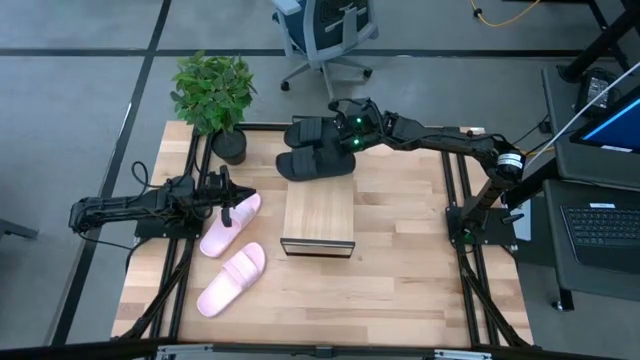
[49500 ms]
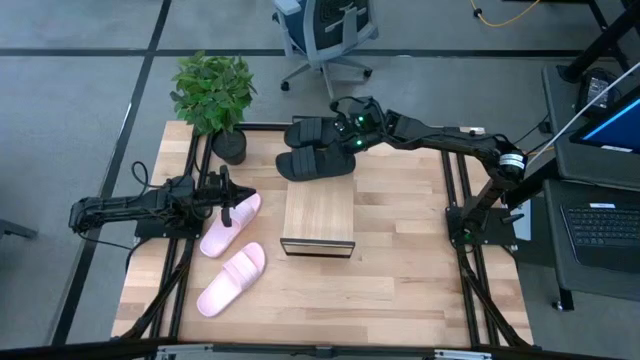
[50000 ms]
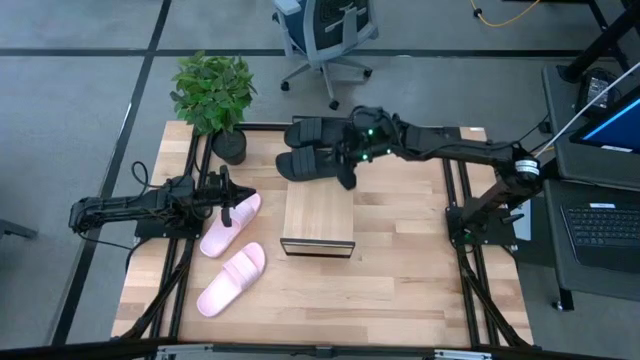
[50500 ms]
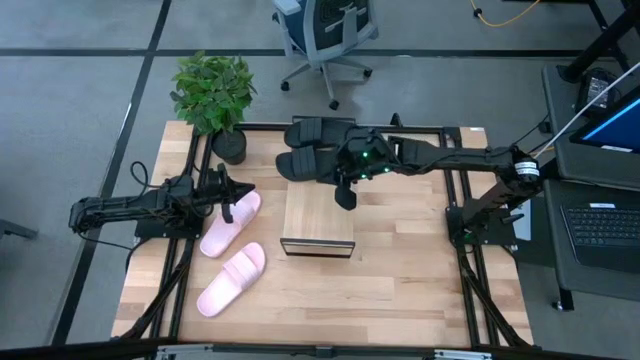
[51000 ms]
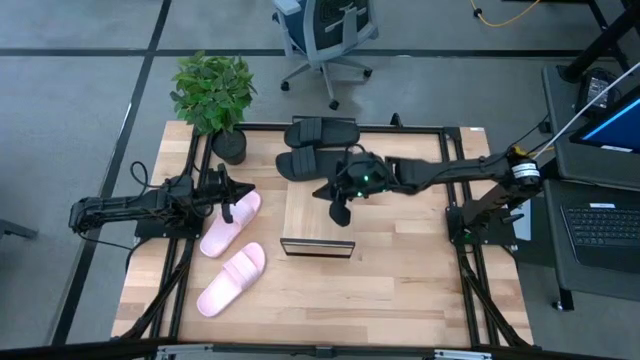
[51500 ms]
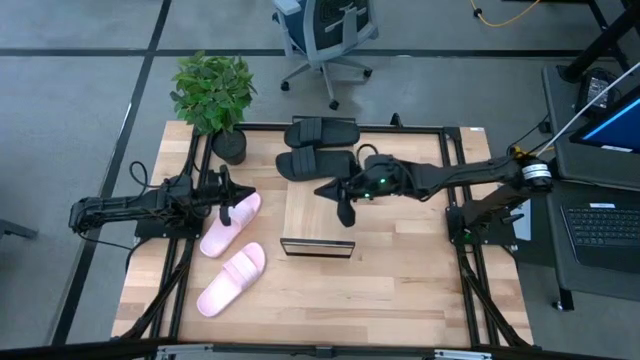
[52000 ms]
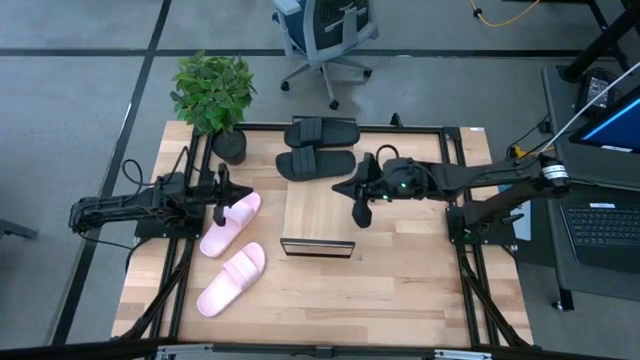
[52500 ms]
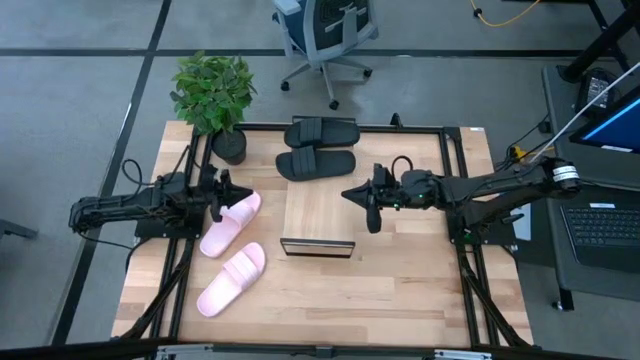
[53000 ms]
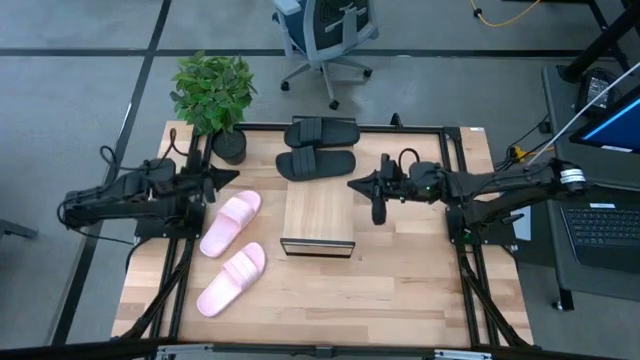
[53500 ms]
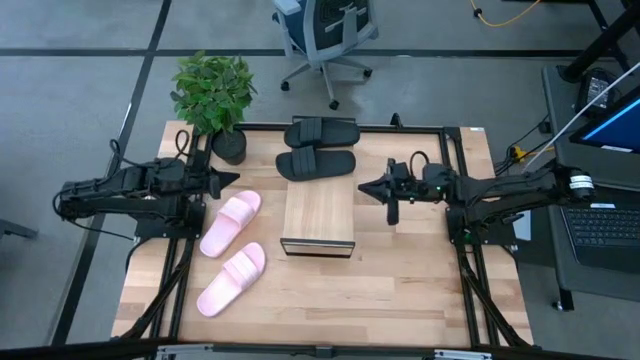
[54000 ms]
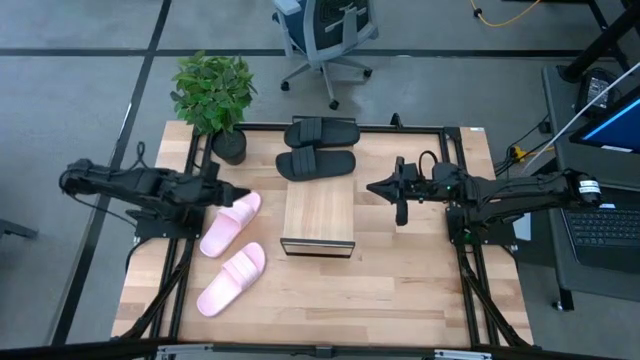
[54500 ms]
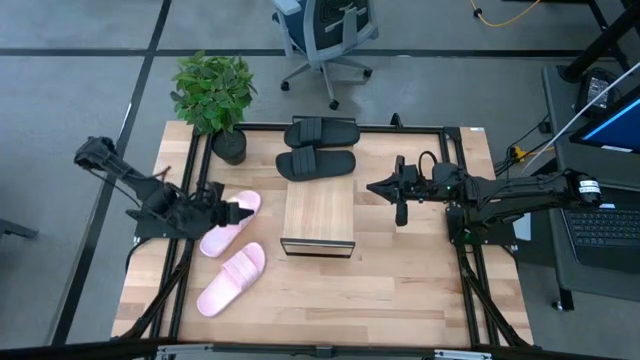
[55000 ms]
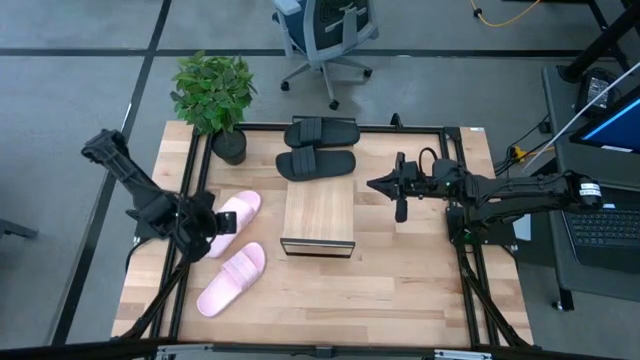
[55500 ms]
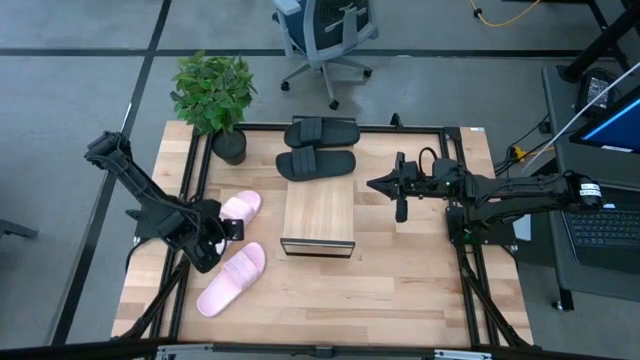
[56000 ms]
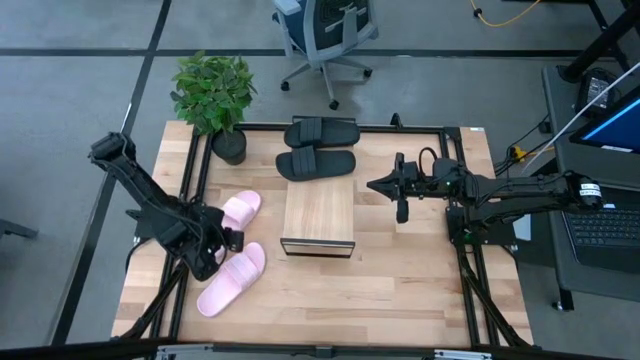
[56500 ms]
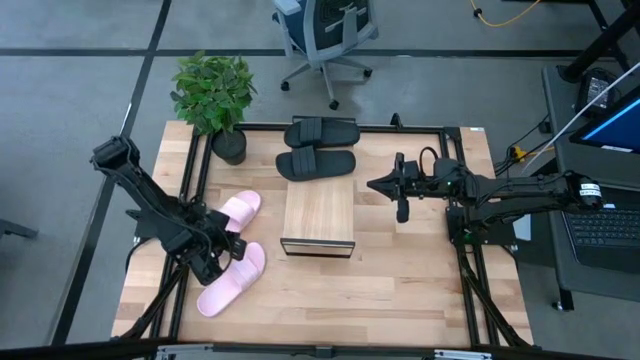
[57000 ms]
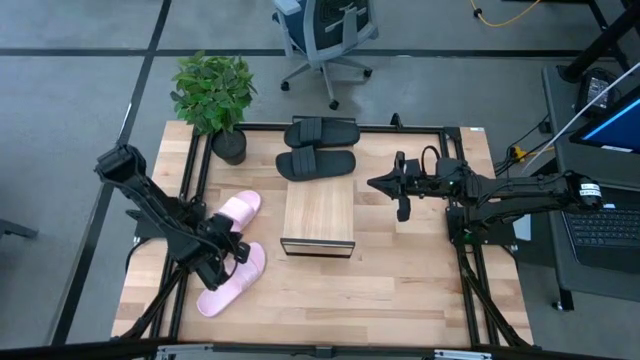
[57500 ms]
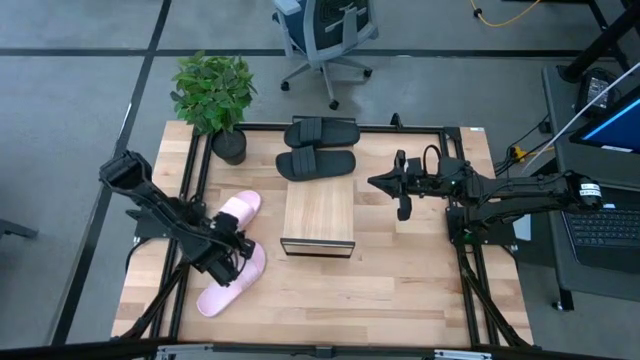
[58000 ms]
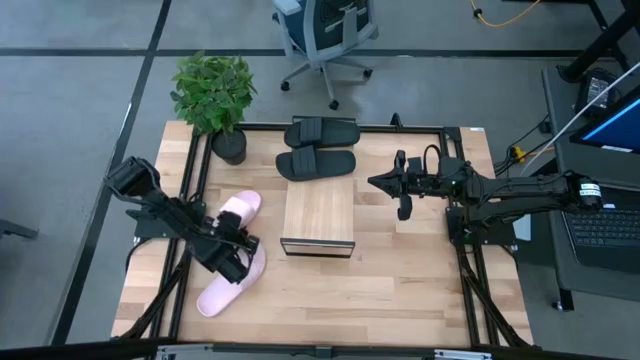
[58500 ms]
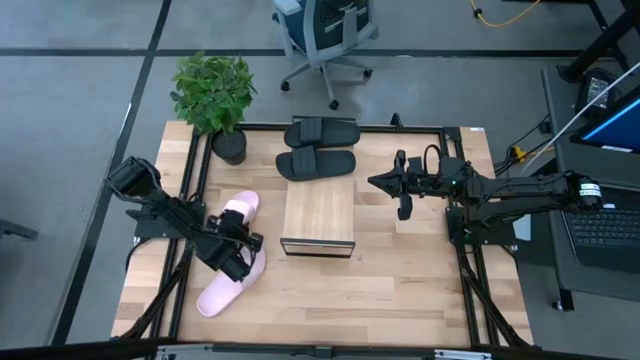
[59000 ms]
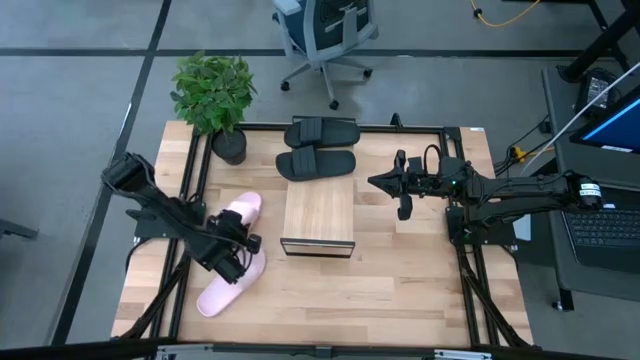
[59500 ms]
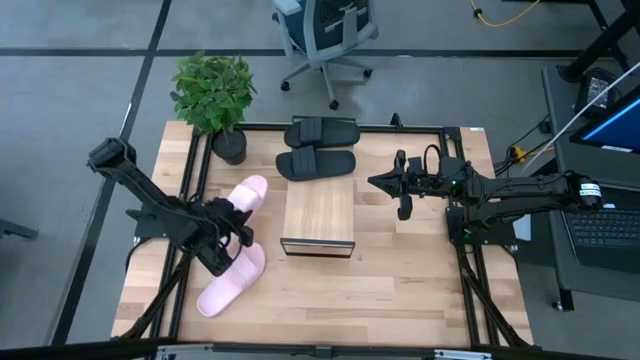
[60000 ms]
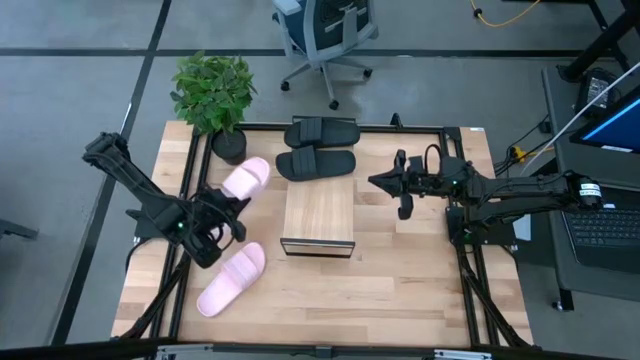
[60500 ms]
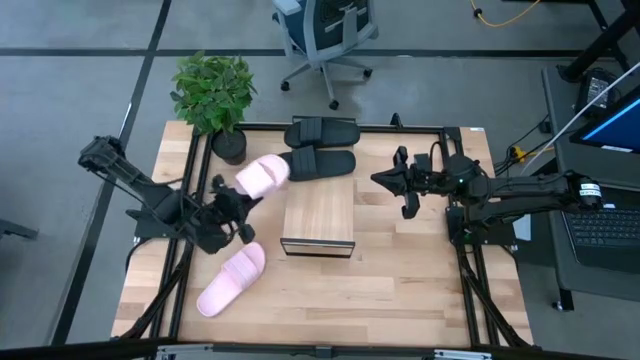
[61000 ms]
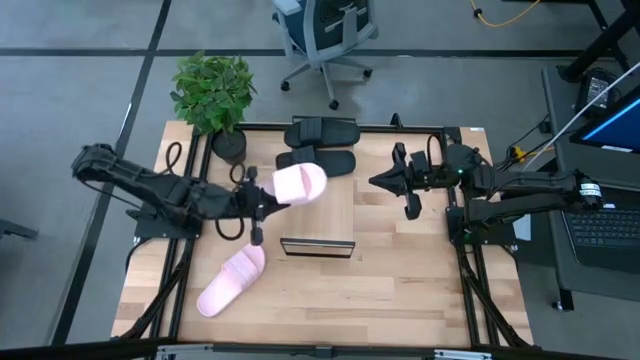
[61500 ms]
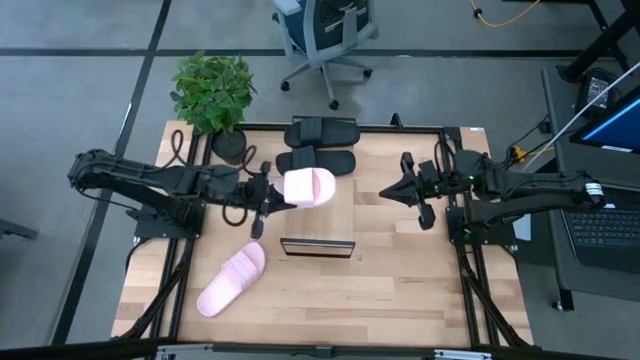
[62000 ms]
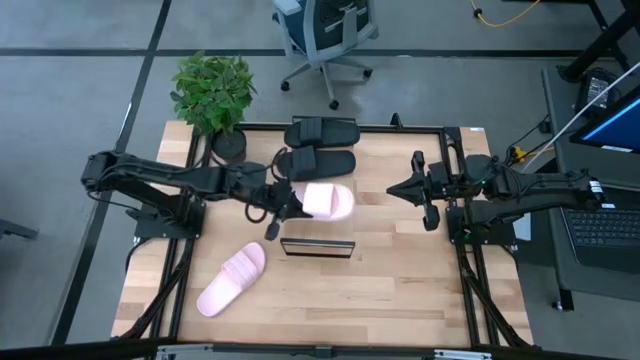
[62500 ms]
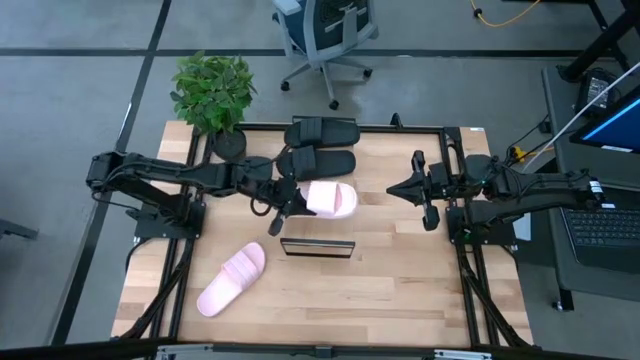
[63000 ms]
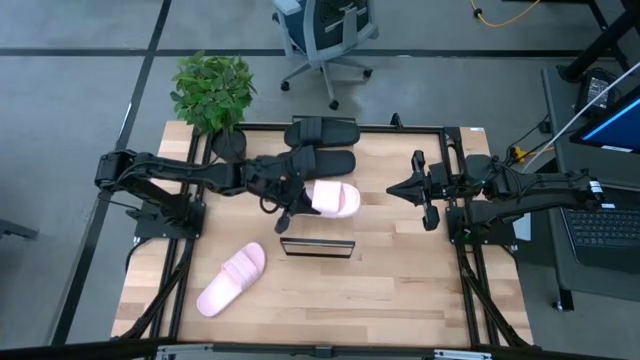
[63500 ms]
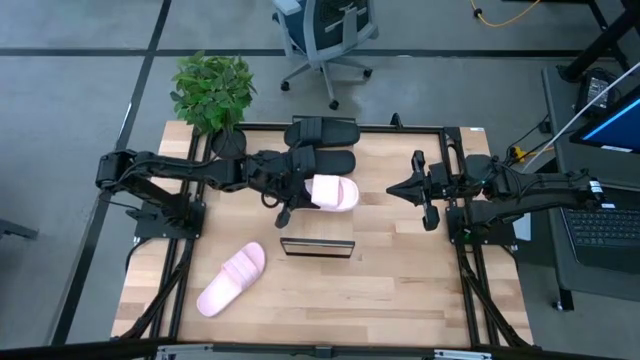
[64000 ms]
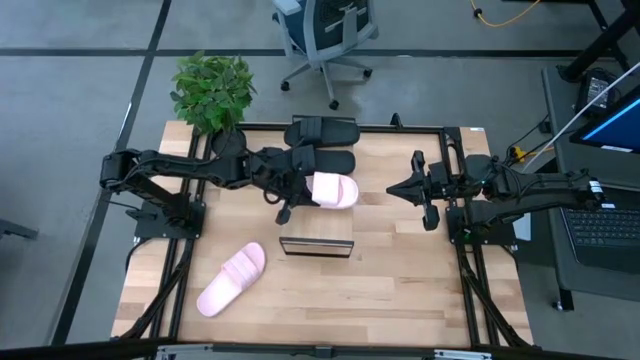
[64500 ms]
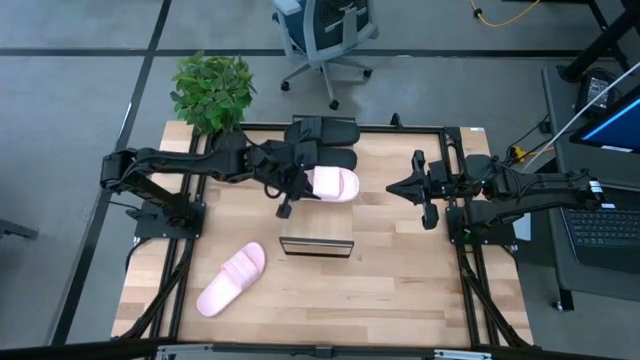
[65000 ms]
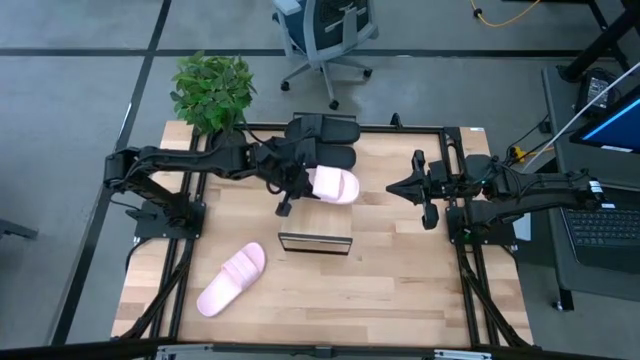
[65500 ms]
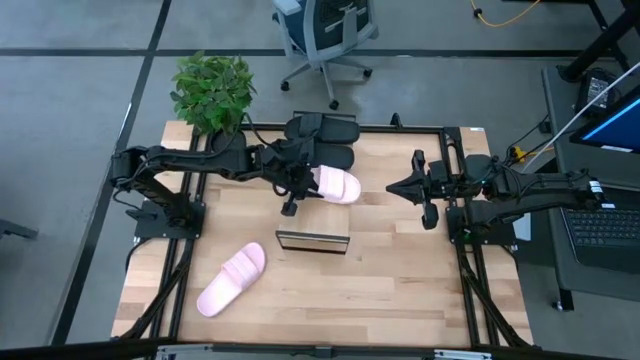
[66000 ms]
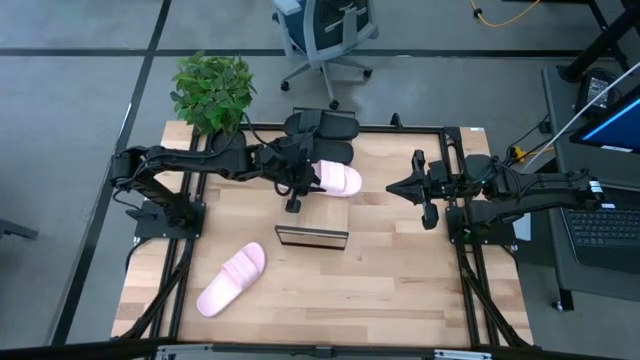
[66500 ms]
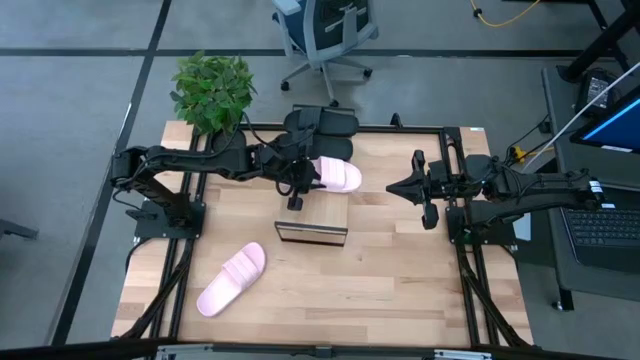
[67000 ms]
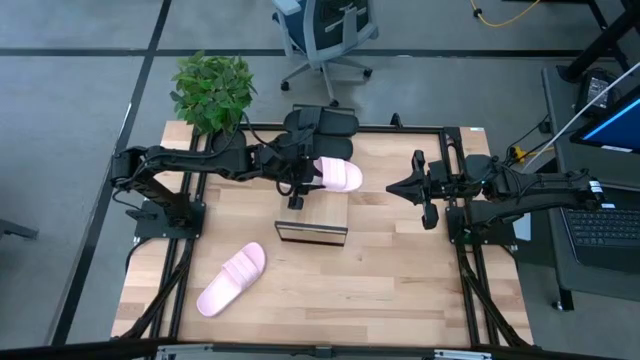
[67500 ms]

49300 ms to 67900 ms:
Task: Pick and place slides into the shelf
Put the top pink slide on the shelf

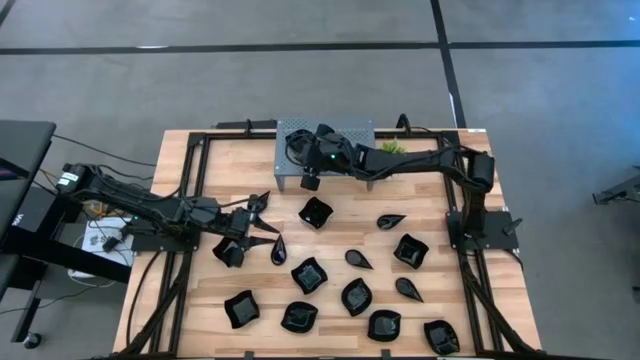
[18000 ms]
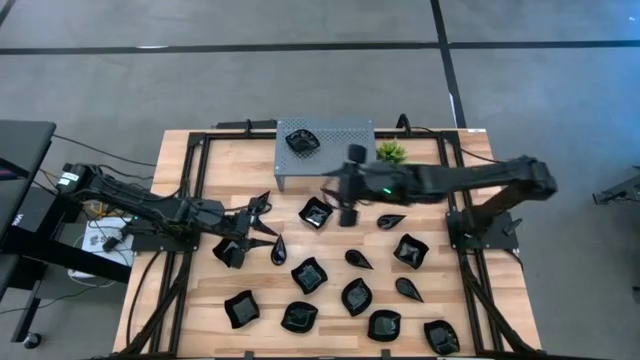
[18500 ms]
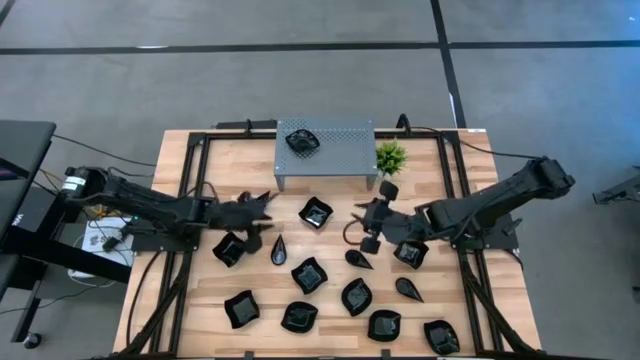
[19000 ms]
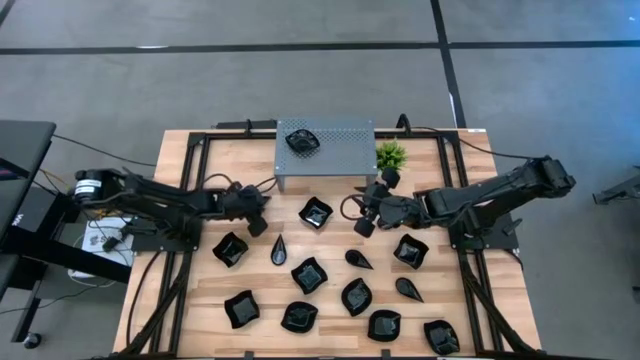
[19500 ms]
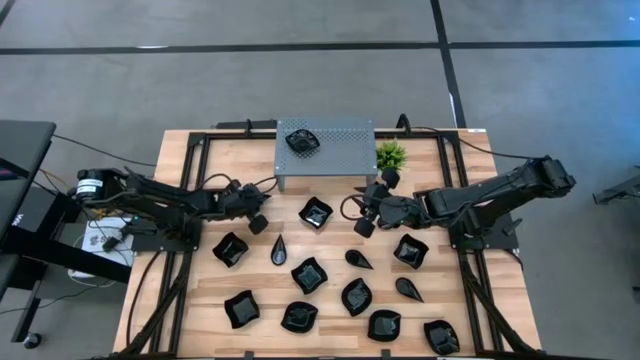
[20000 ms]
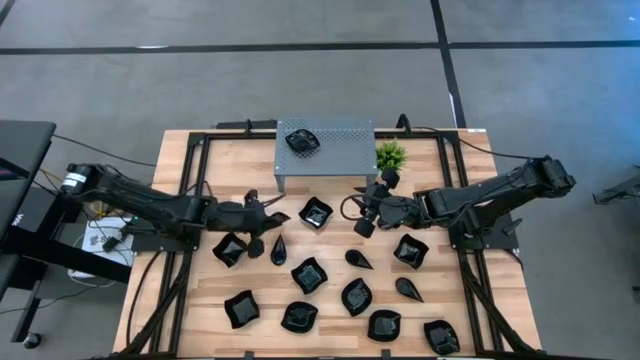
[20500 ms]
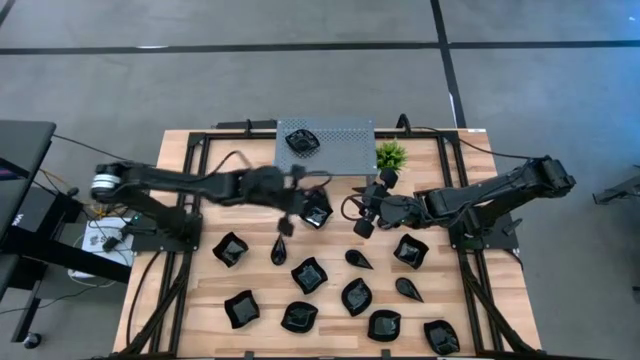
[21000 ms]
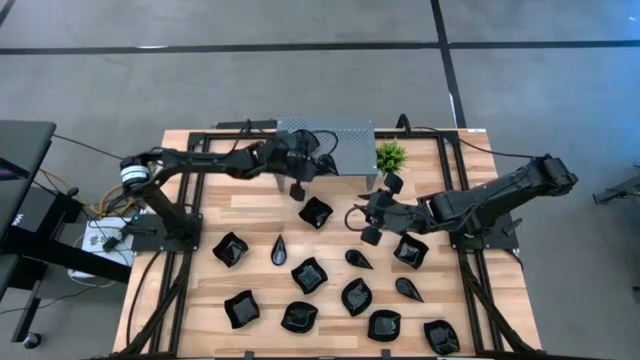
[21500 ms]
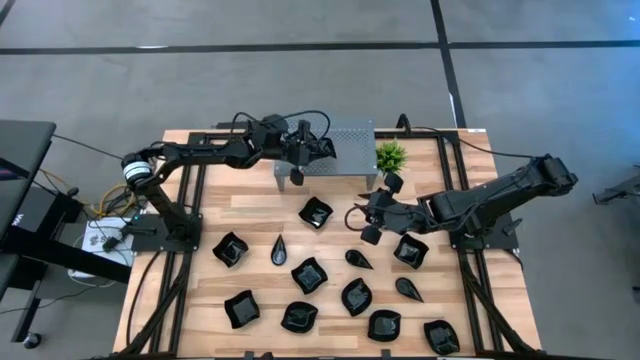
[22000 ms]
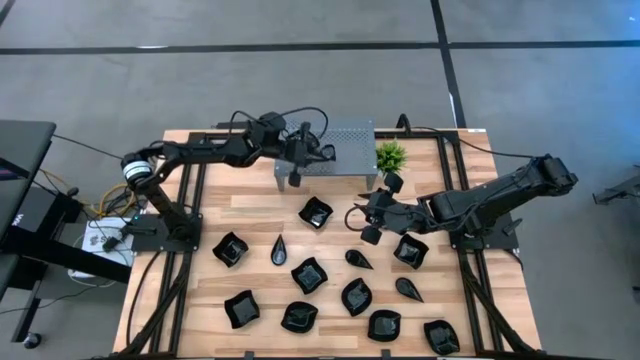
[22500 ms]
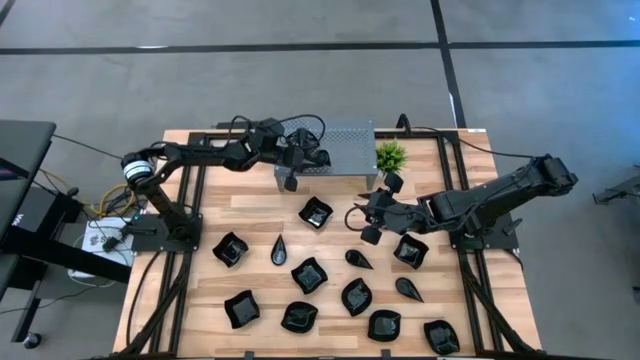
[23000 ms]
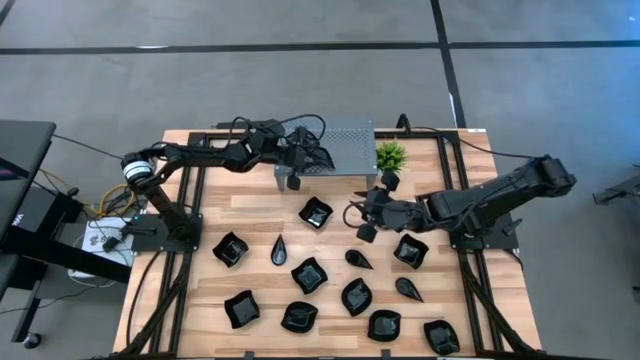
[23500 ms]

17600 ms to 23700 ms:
Task: Pick & Place Mini shaped plates
Put the drop-shaped plate on the shelf
